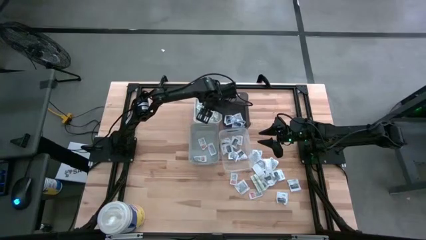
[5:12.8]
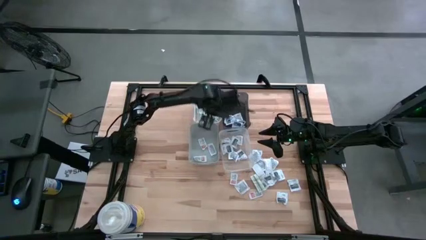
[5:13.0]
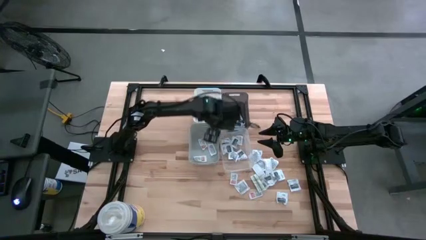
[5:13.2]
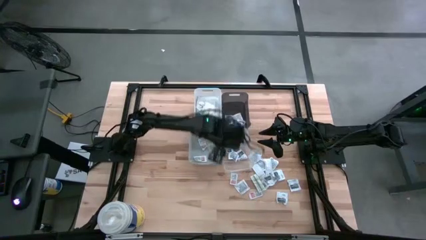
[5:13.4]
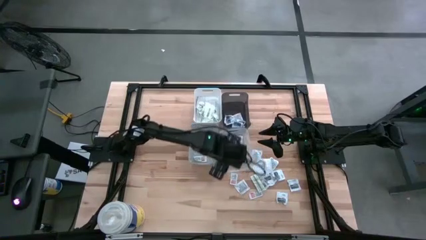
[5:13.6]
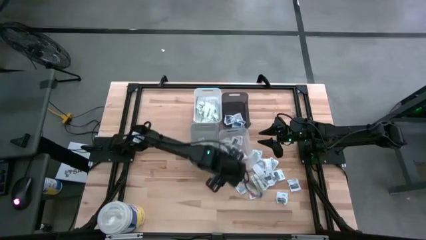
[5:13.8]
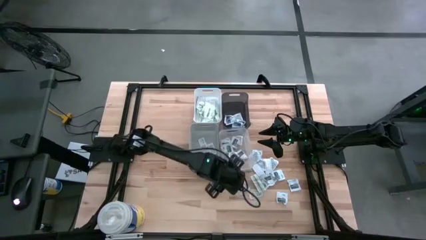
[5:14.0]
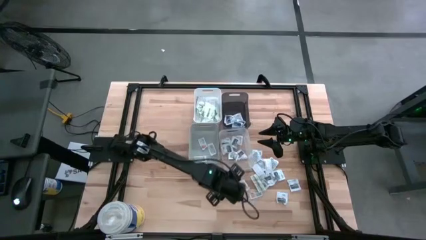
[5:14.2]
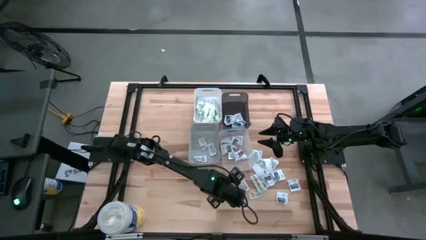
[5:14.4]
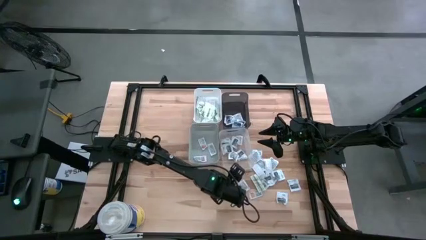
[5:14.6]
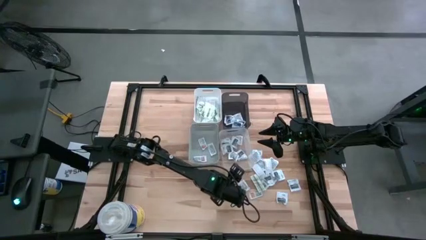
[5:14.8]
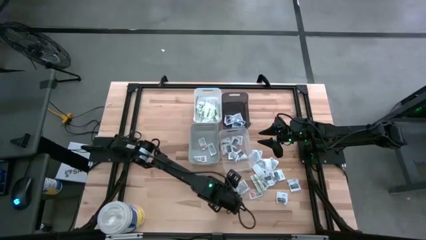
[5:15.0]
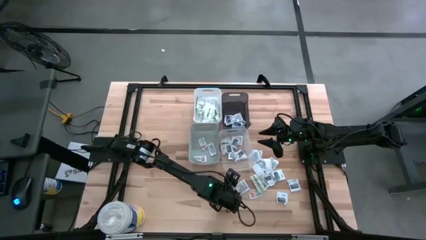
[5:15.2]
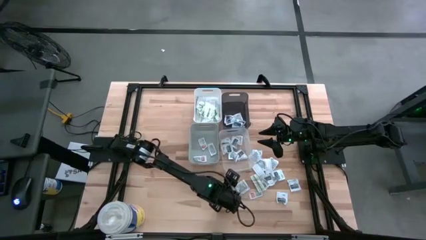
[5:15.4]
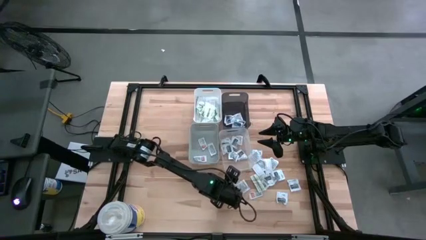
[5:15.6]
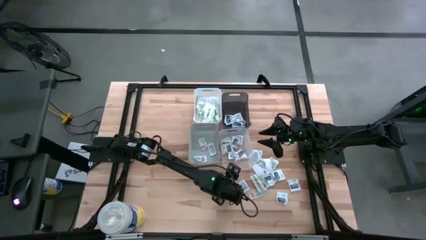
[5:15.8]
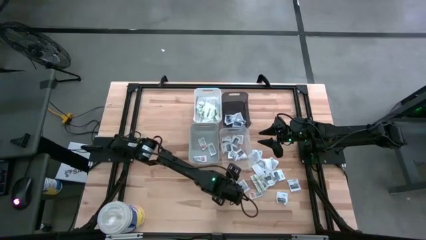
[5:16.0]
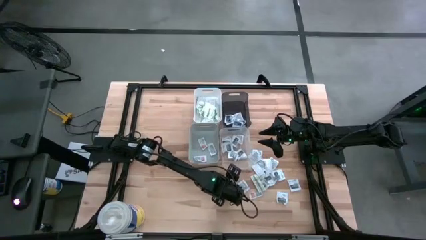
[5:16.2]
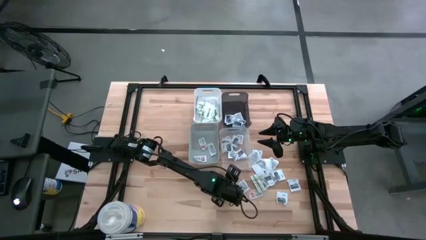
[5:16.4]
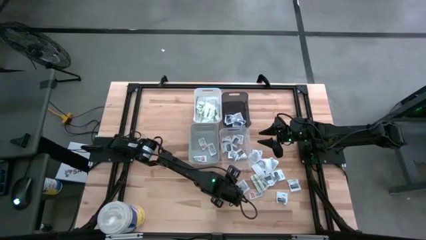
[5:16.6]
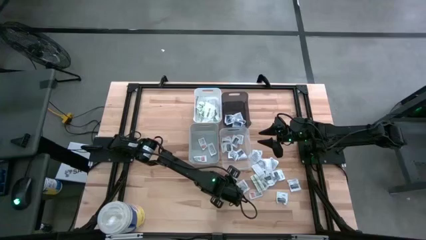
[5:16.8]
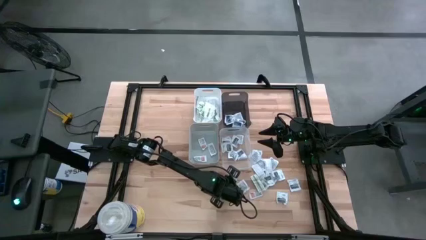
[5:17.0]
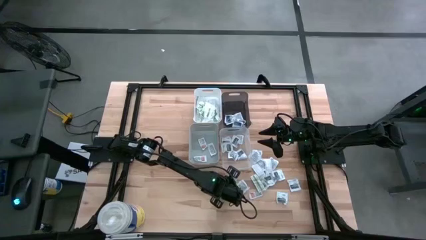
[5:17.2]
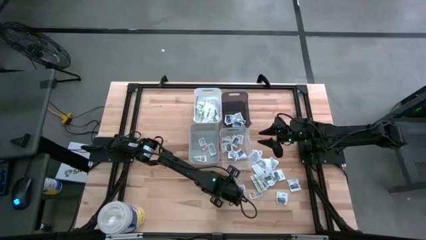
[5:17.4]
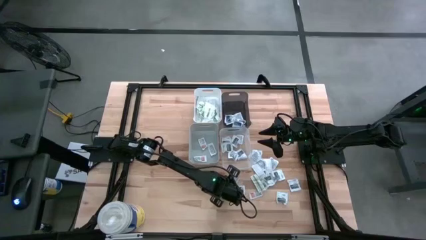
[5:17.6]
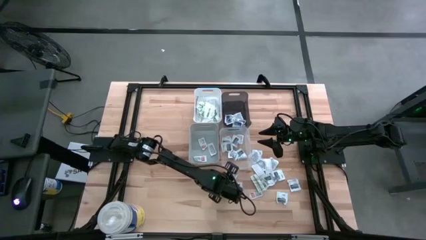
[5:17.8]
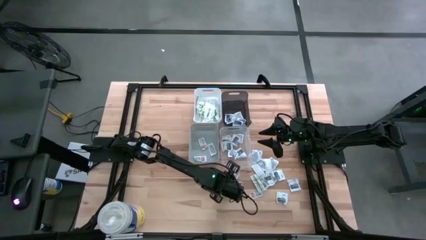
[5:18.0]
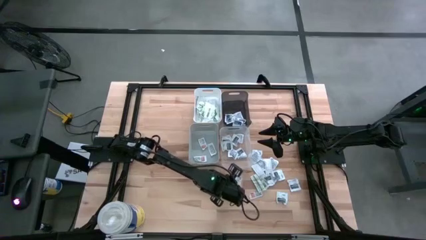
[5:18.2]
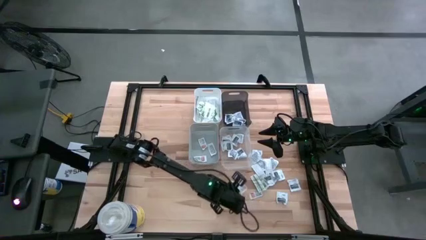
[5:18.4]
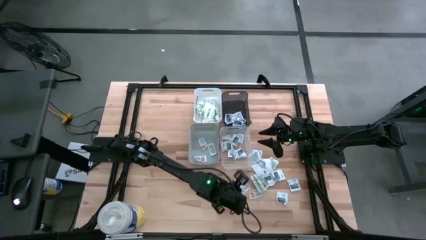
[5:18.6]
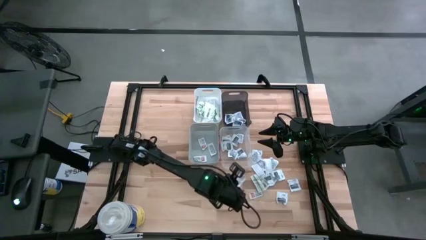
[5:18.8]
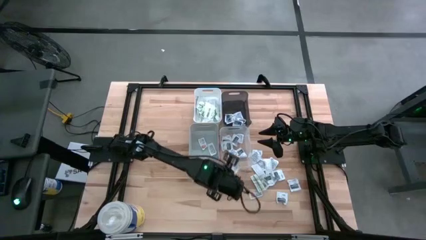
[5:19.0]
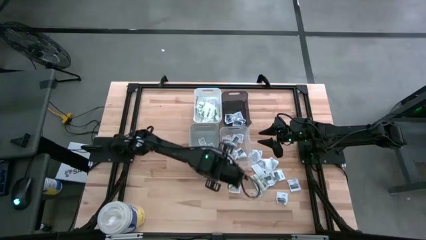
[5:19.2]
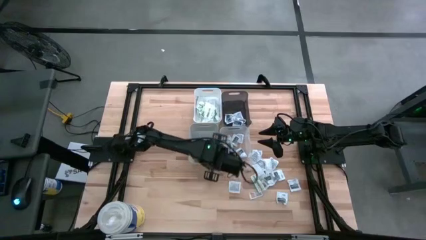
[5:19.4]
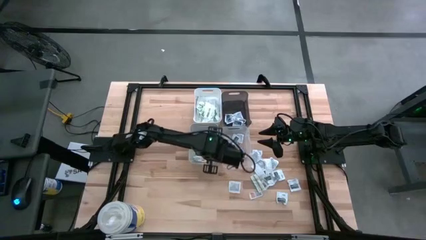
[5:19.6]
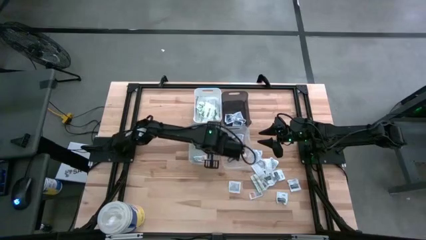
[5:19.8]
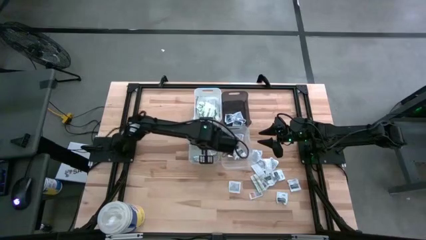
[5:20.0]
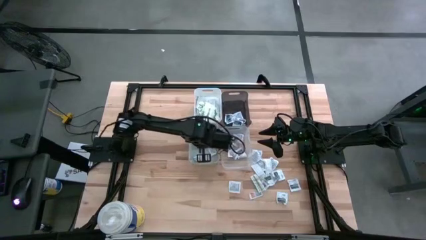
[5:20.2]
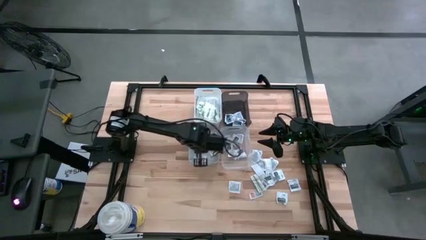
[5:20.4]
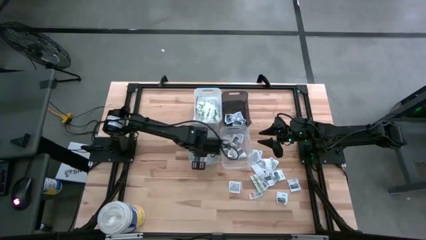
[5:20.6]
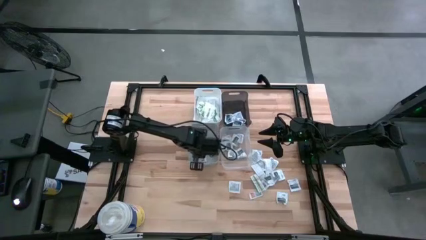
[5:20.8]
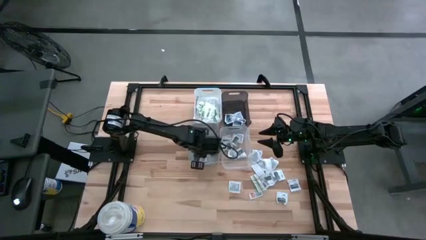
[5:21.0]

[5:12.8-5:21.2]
Task: Pick & Place First Aid Supplies
Put the orange ointment pack into the gray bin

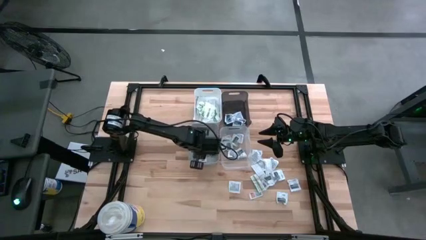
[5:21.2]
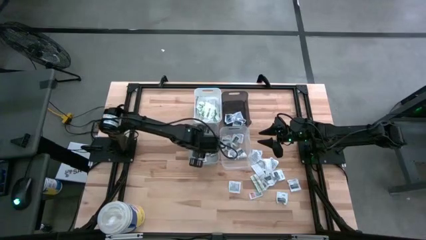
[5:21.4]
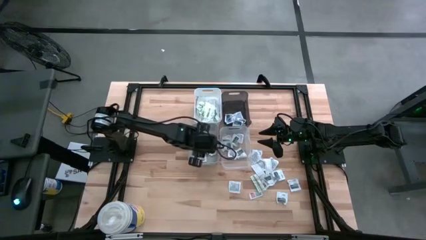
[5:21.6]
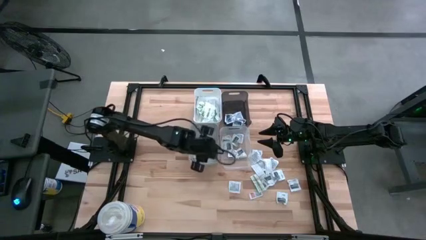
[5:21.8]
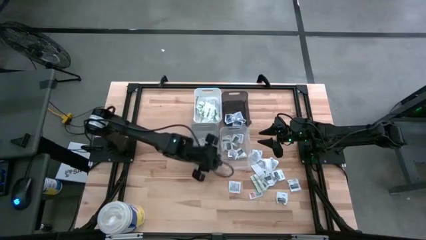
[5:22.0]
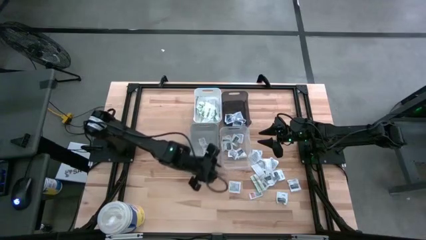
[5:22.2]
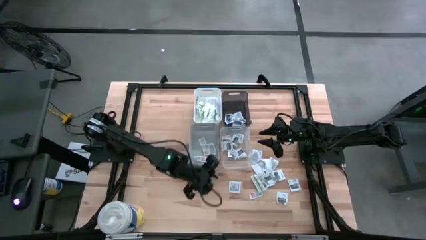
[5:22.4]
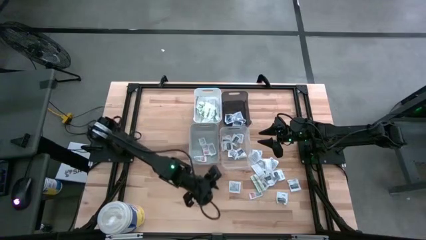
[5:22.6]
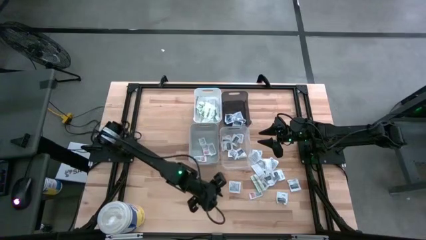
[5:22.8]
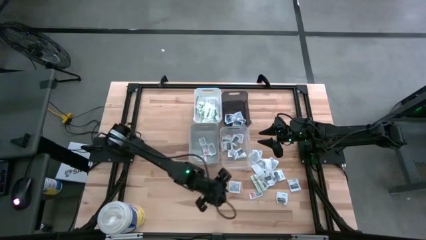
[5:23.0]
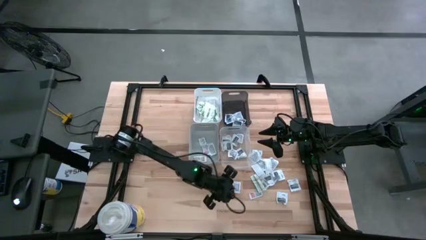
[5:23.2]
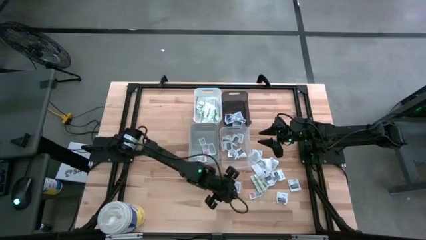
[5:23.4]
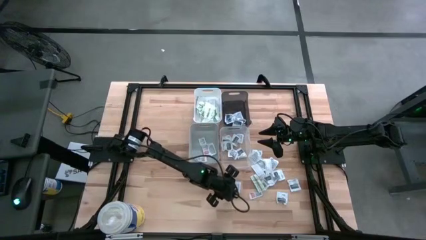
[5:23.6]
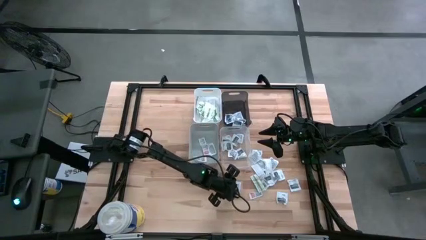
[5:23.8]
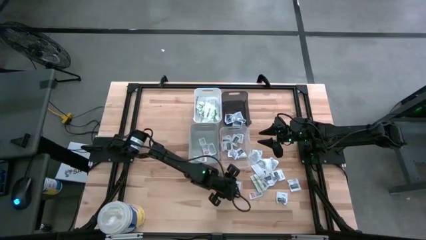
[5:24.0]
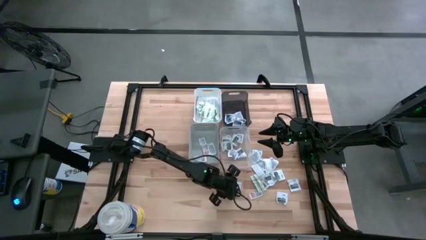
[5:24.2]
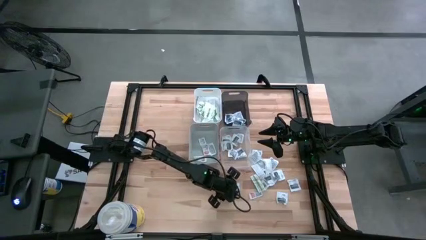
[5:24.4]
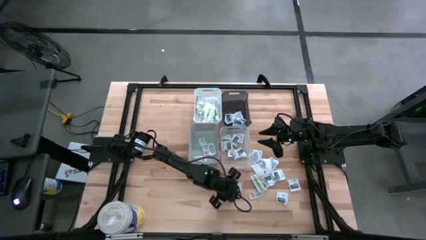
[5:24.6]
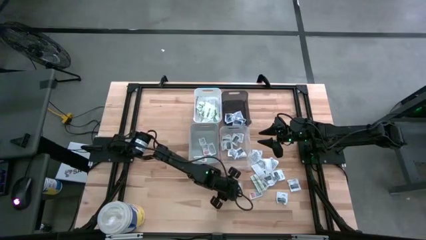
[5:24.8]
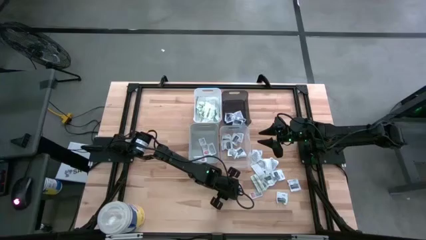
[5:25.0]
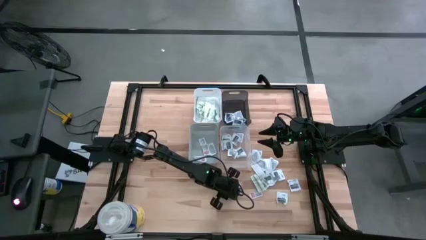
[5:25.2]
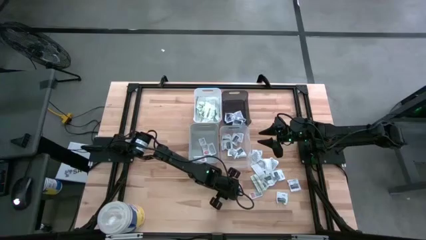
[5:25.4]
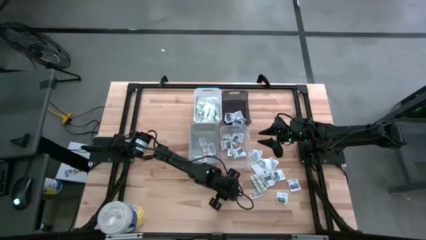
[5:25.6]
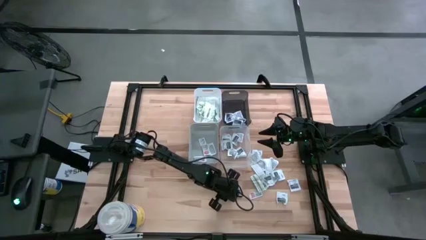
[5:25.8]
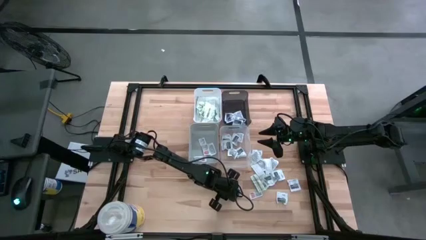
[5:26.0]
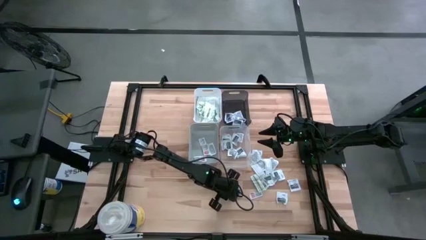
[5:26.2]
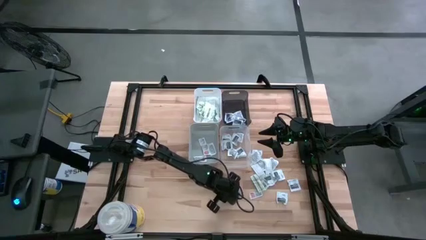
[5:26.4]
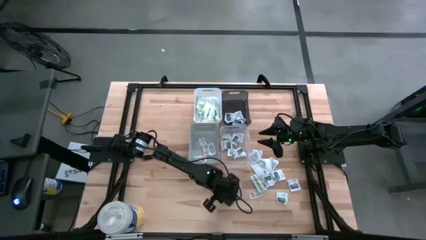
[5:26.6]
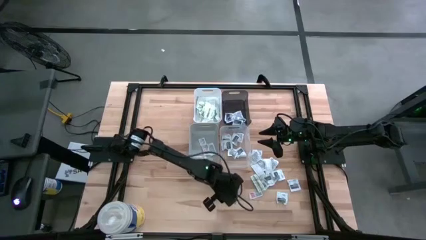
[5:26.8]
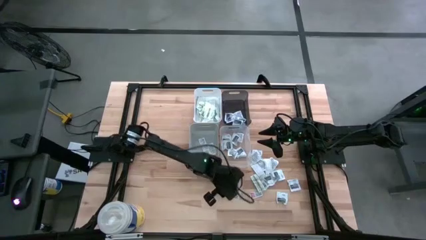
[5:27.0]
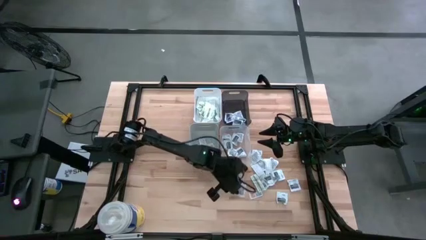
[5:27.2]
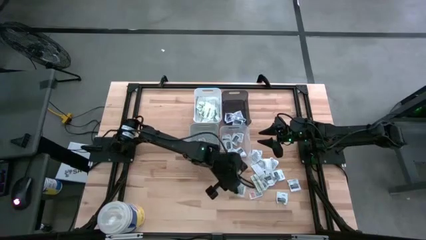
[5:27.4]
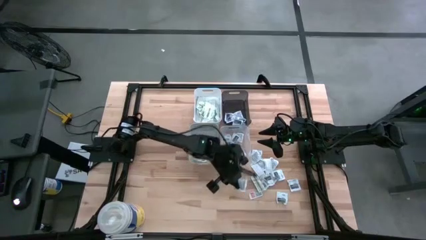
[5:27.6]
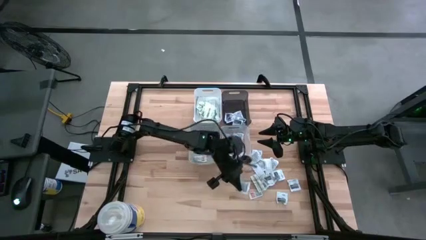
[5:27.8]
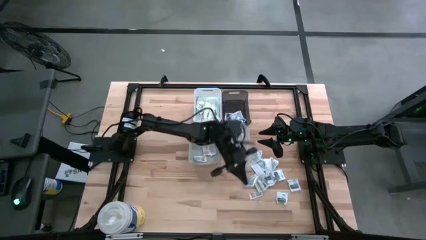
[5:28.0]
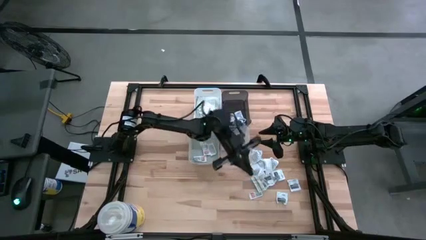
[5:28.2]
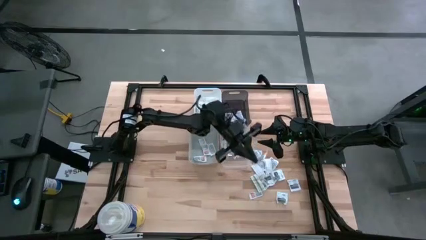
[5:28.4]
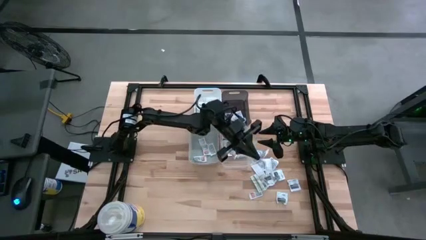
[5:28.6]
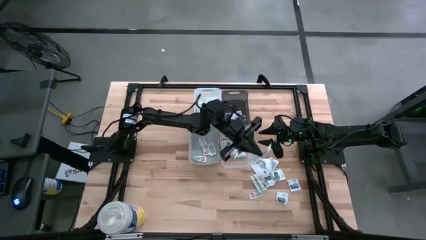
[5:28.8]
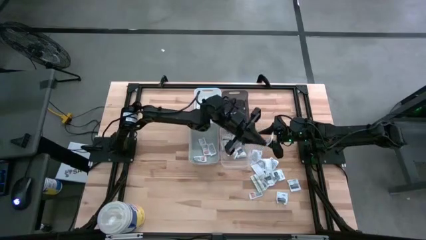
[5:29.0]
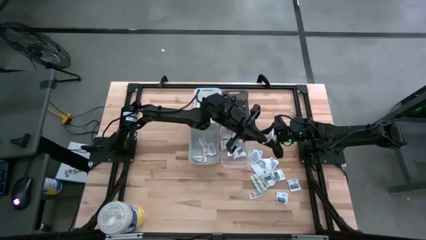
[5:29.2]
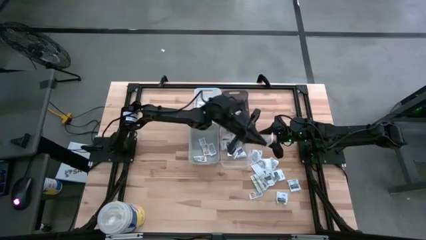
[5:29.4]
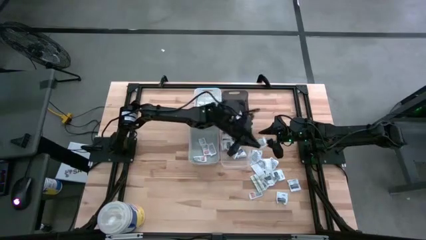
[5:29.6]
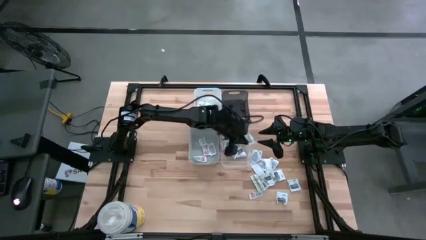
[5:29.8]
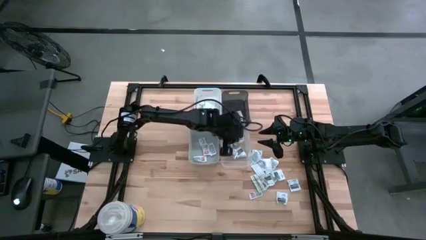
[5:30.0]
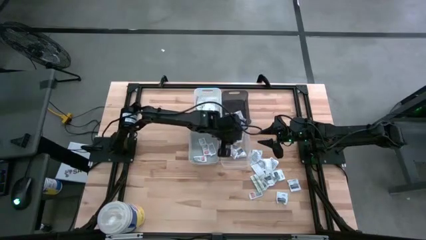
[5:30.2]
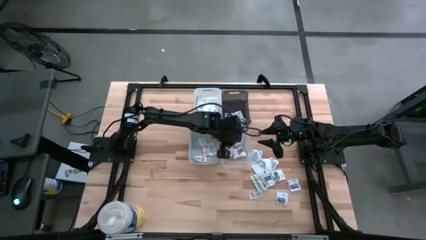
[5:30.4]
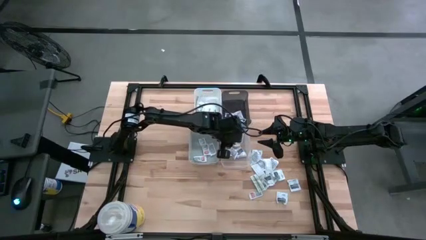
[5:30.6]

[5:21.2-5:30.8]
Put the gray towelette pack into the transparent bin
